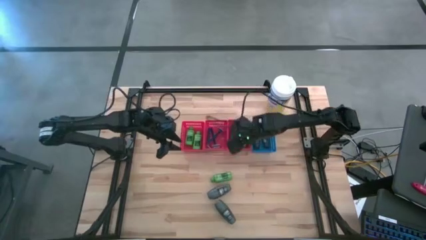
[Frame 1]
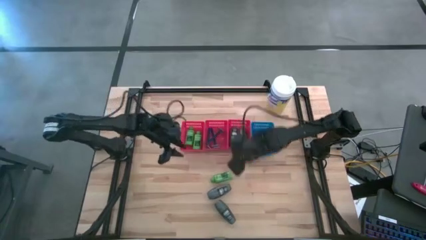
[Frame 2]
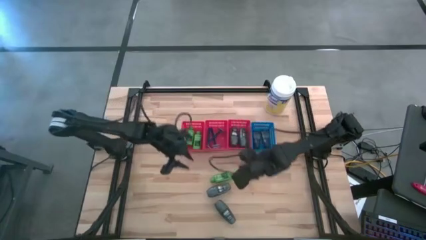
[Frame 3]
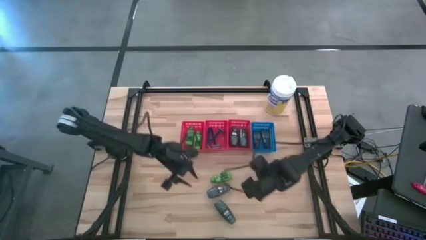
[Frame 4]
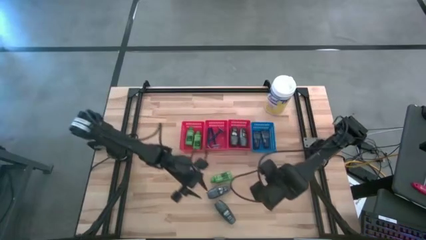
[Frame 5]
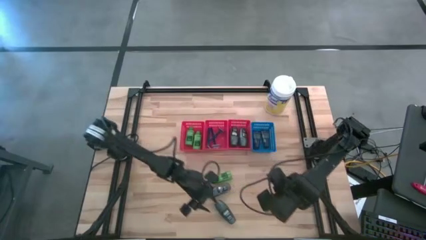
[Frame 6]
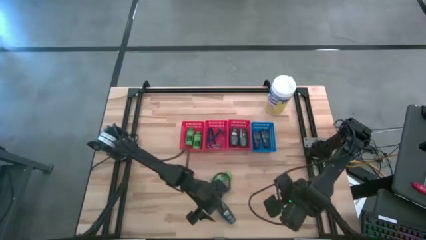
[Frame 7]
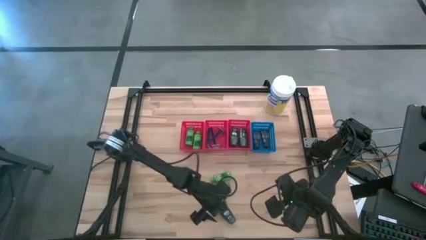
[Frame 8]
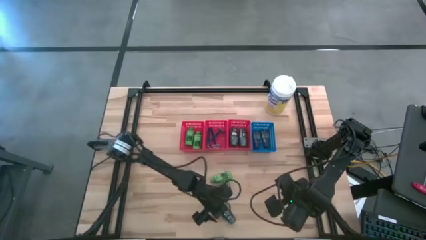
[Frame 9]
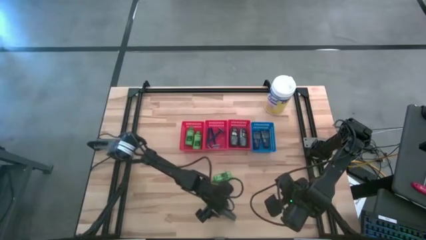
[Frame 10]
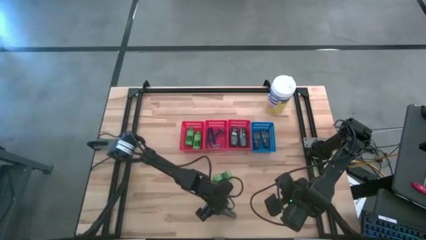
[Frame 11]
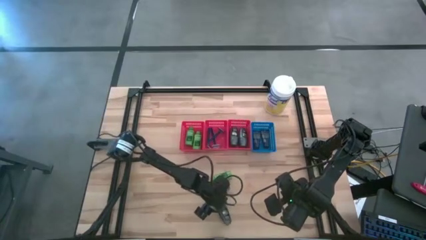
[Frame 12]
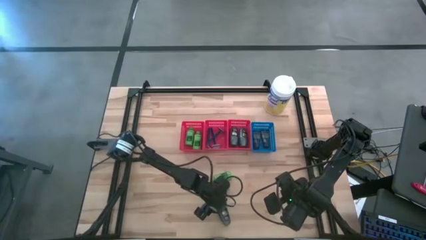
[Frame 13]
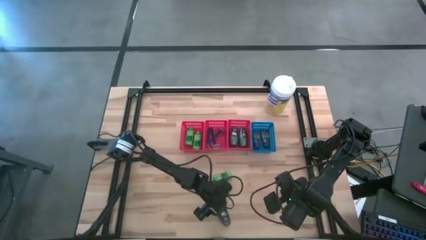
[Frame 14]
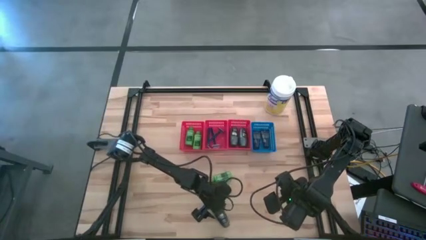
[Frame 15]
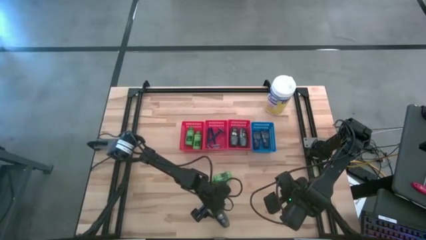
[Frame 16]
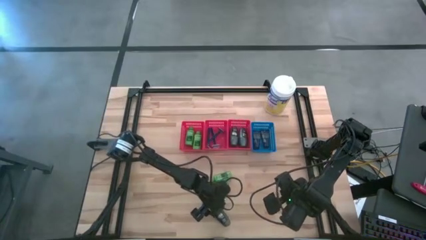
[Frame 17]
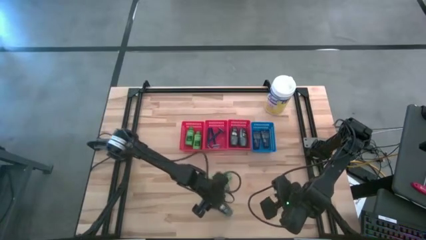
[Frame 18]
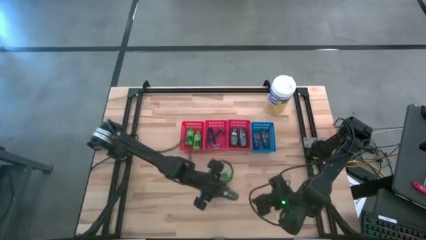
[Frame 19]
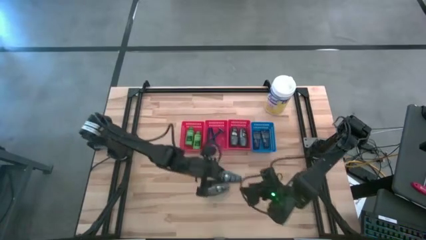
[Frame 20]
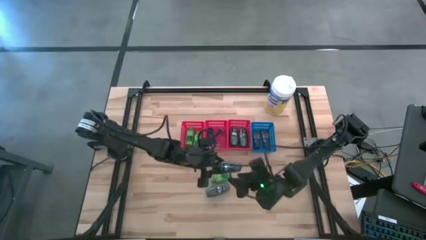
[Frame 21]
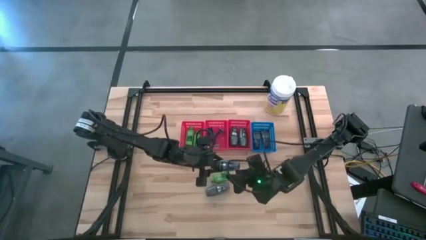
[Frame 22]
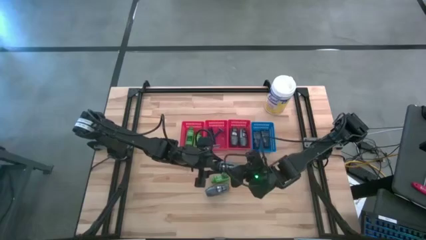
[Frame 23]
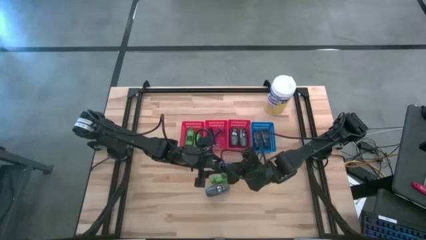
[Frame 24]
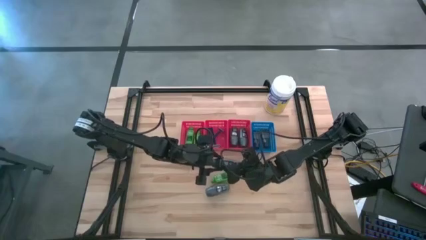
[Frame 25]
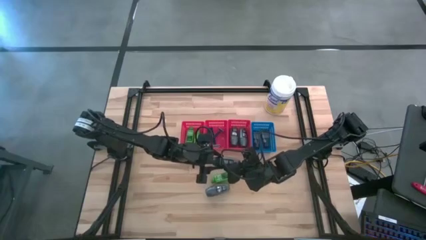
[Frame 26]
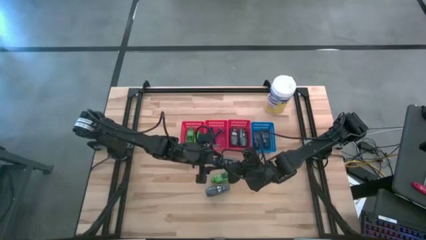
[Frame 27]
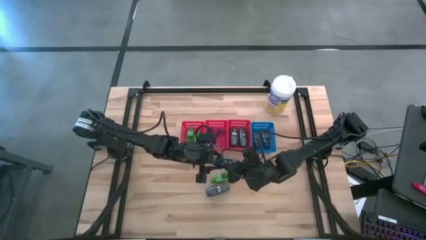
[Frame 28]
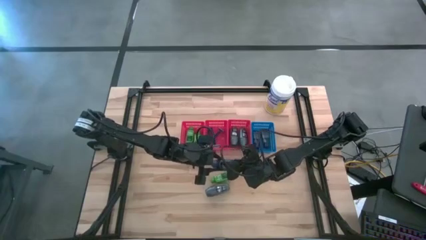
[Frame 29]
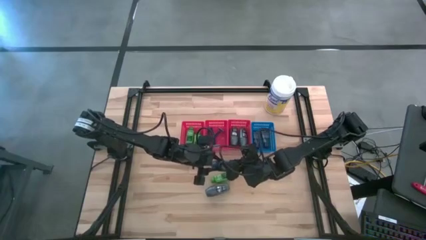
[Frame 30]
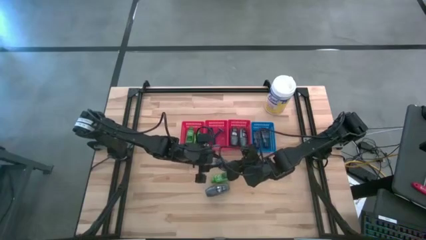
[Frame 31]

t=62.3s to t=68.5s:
Task: Pick & Place Travel size toiletries
Put the gray deodorant into the right red bin

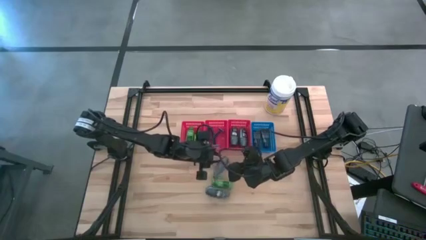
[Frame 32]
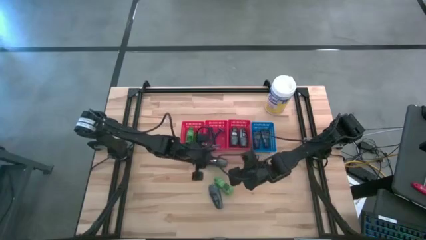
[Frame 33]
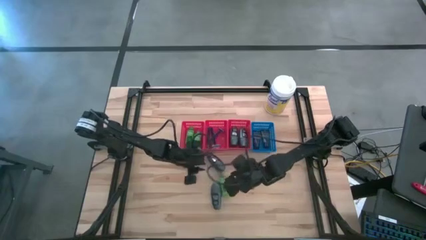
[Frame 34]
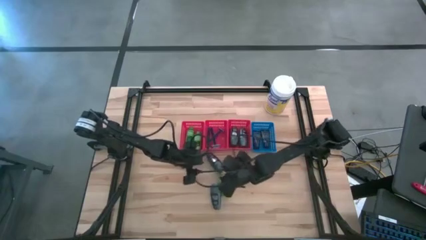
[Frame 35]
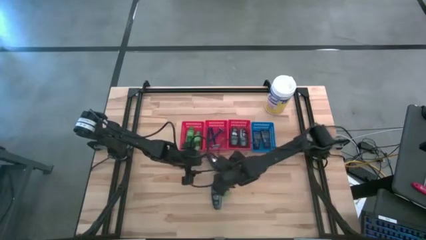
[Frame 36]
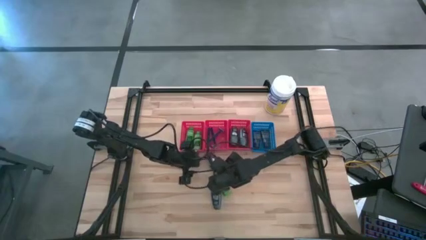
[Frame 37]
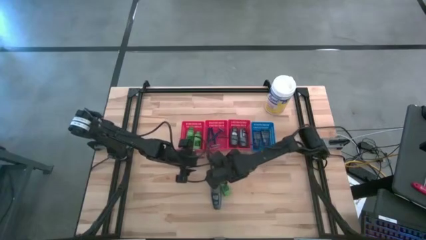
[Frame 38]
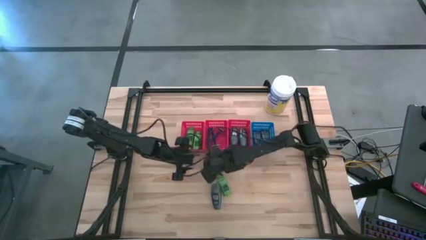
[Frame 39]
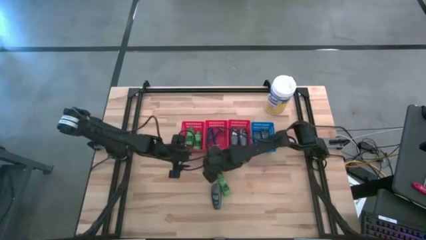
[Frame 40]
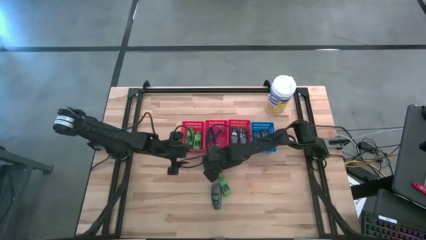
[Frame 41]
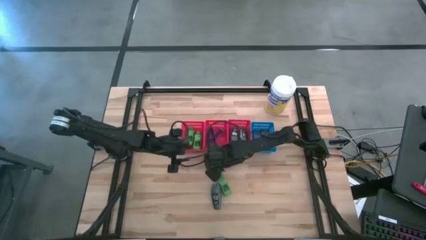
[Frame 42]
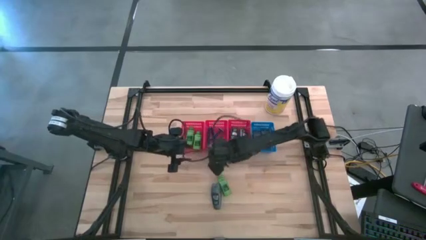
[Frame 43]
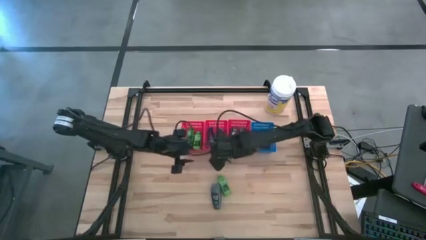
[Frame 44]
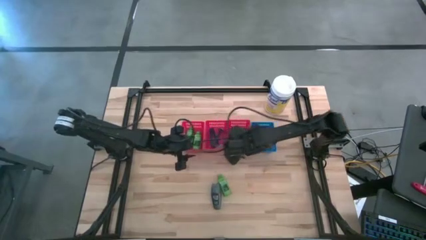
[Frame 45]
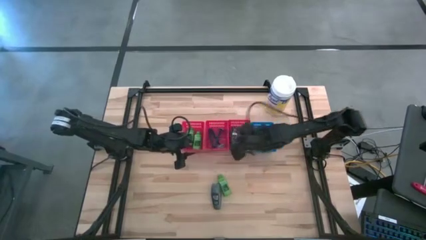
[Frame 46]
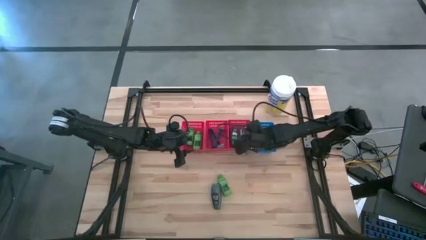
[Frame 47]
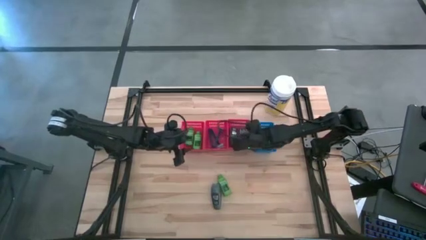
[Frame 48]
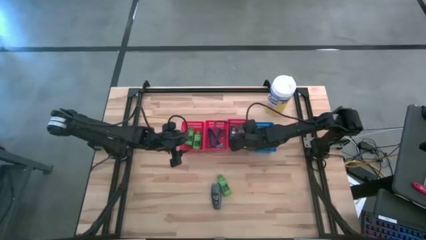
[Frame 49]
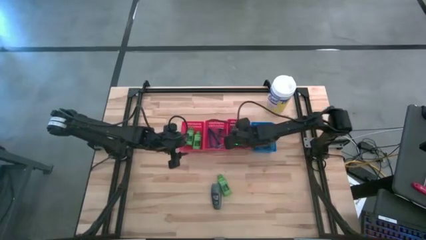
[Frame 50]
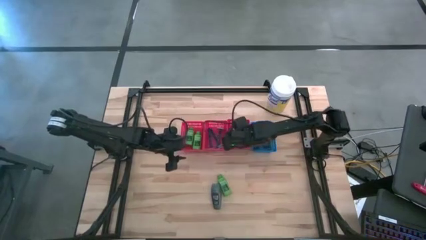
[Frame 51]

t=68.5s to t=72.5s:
Put the gray deodorant into the right red bin

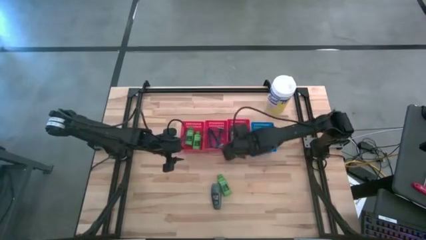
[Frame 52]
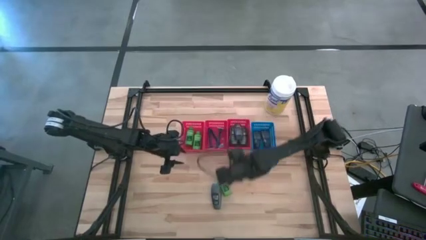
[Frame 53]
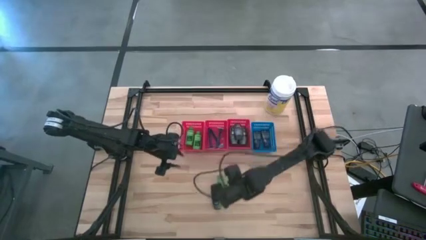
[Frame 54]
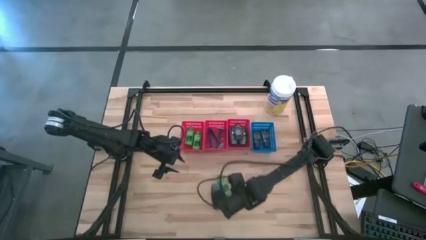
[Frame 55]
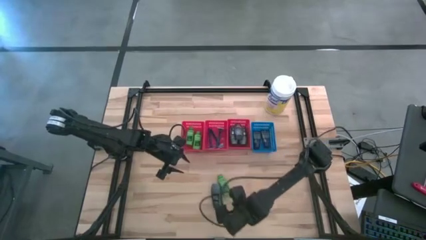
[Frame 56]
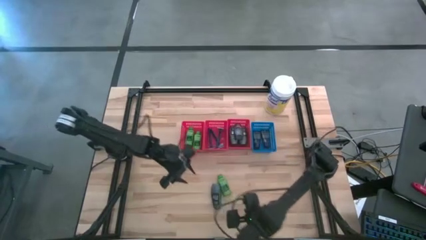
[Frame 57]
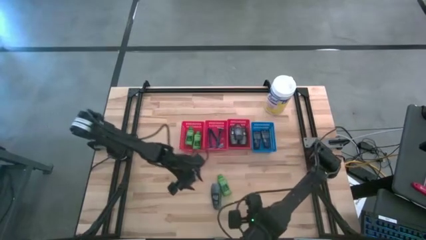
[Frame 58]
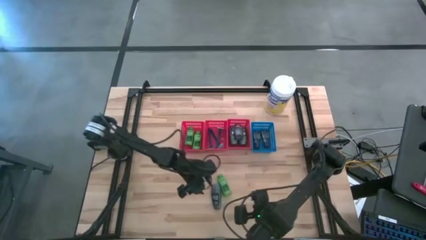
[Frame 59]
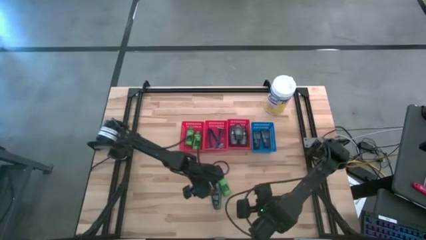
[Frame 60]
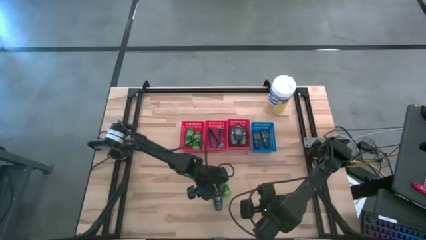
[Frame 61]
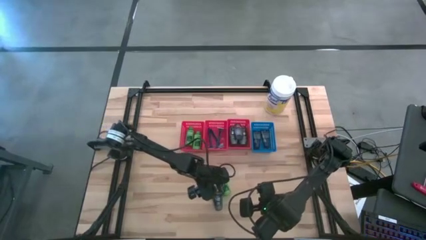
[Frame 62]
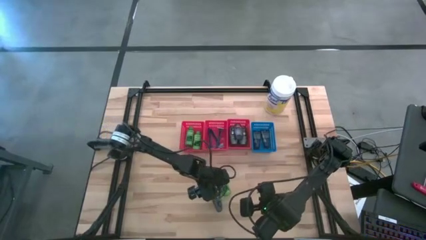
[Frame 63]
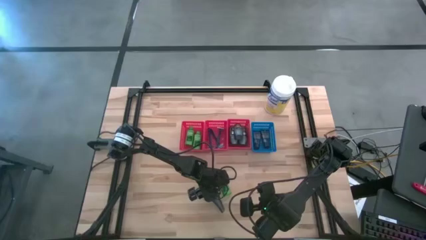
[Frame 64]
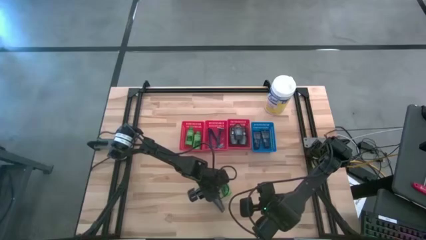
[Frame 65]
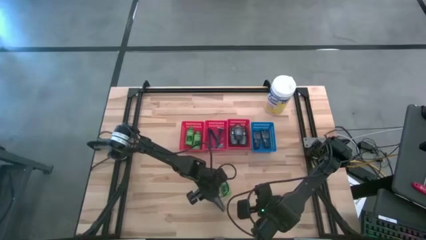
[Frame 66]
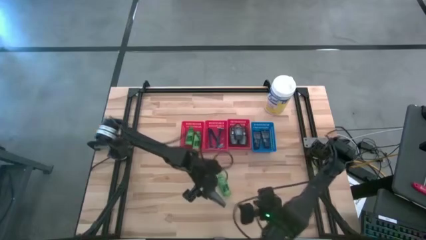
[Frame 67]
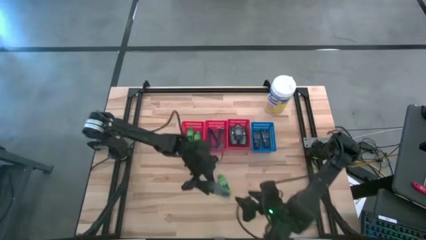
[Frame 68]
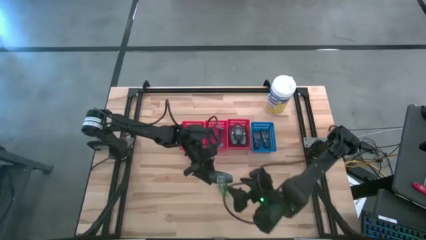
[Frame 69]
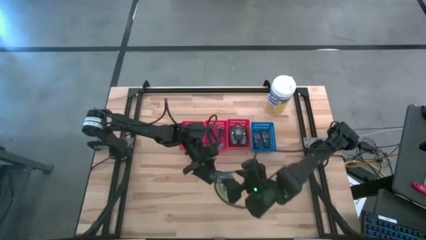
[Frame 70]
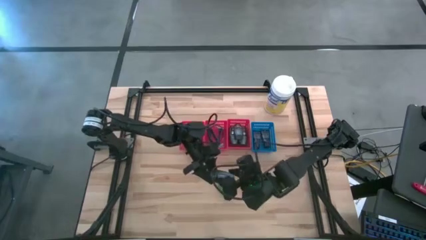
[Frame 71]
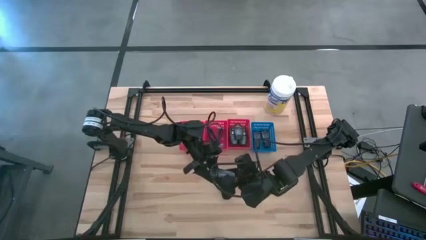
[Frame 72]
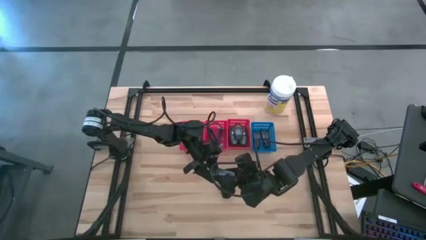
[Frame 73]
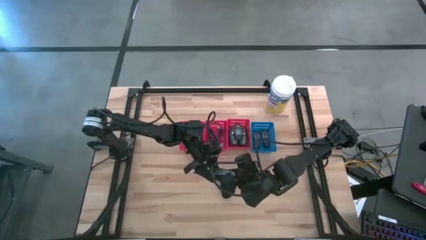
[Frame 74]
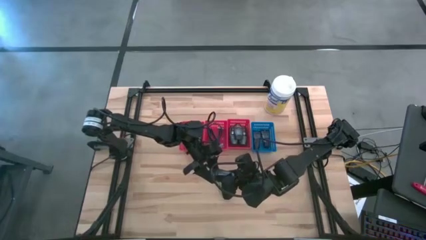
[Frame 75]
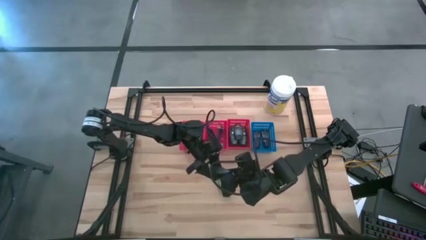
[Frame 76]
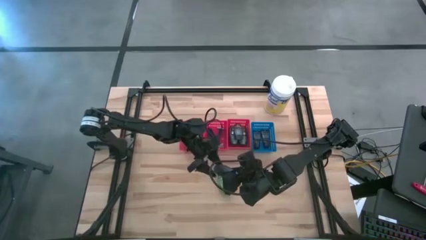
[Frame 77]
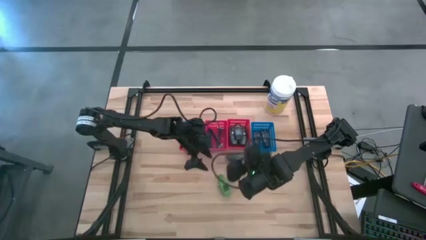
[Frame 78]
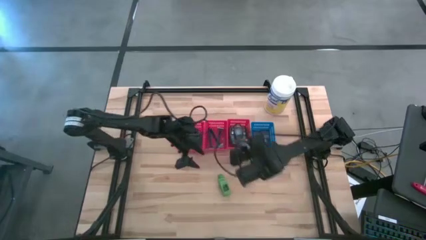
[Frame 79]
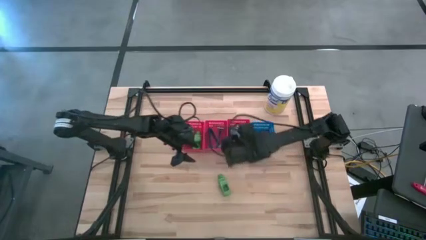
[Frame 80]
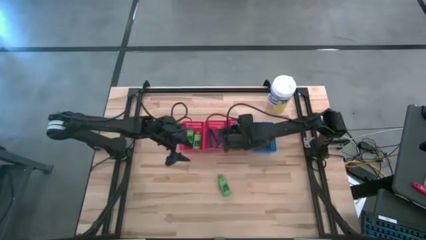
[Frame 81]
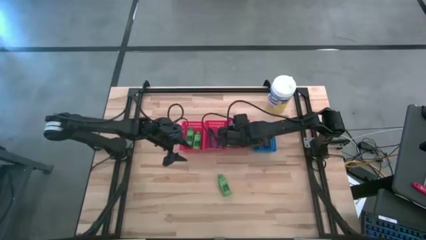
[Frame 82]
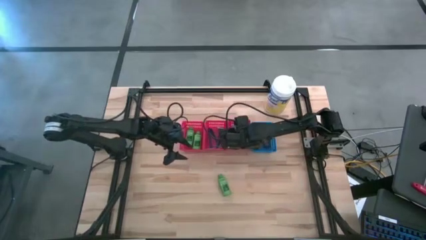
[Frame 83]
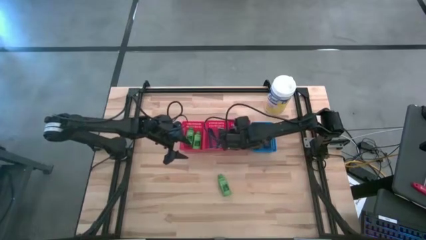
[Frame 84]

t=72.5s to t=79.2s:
Put the gray deodorant into the right red bin
